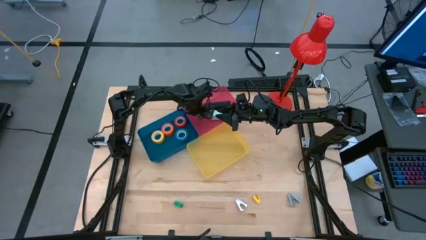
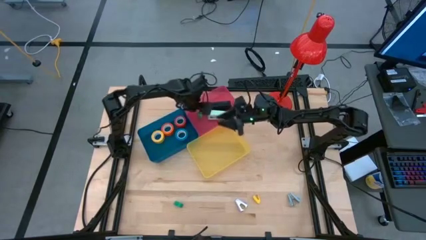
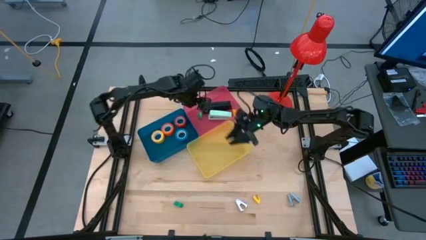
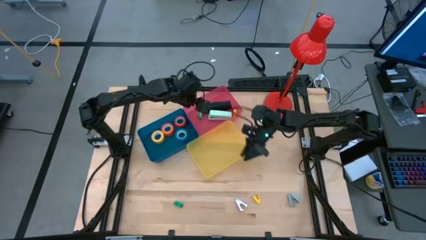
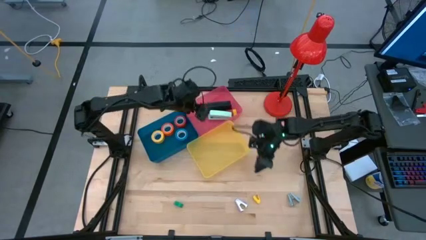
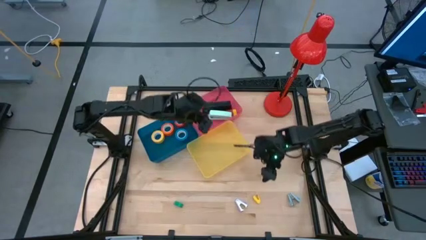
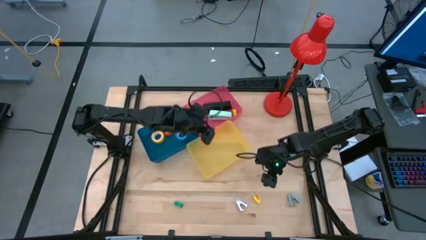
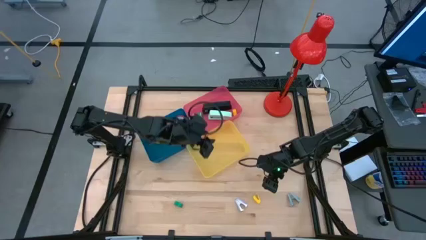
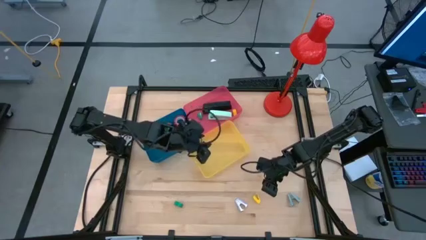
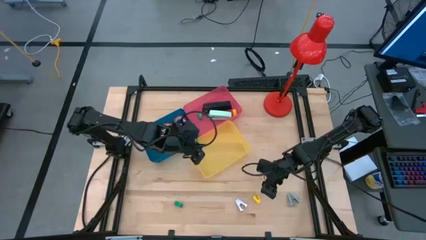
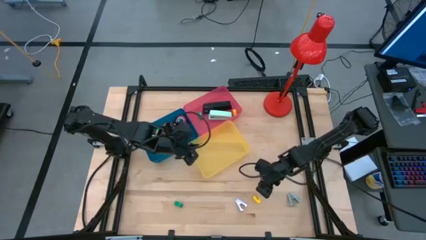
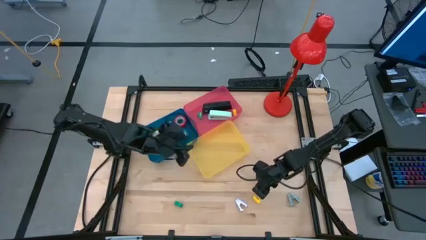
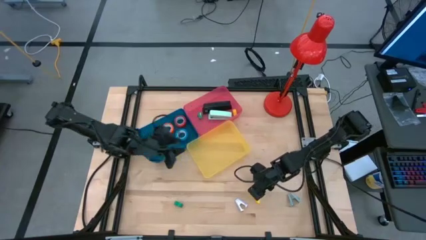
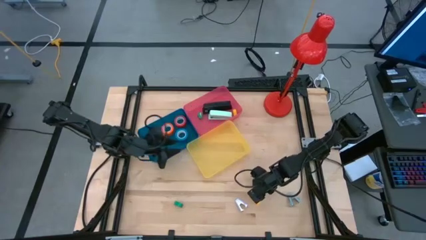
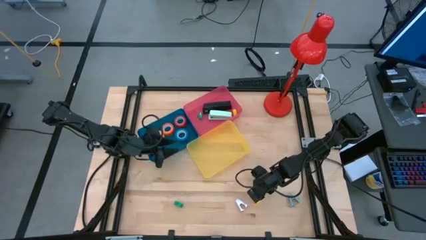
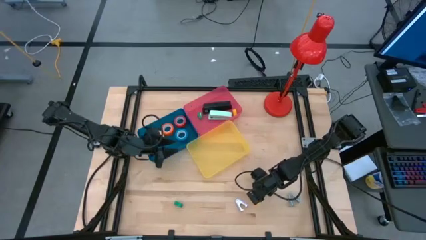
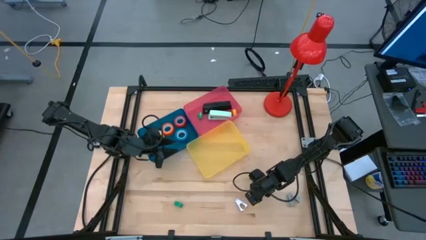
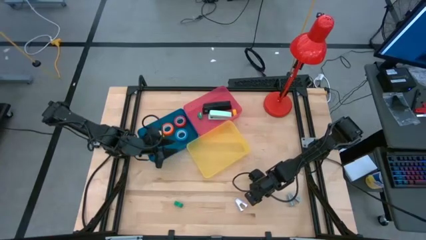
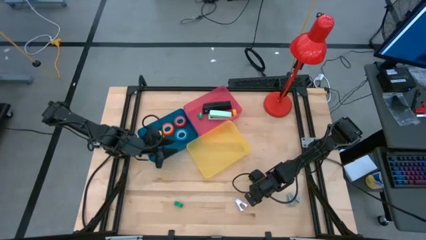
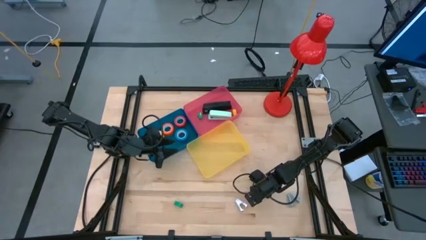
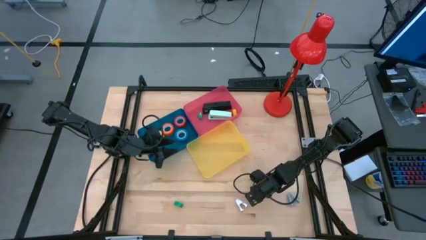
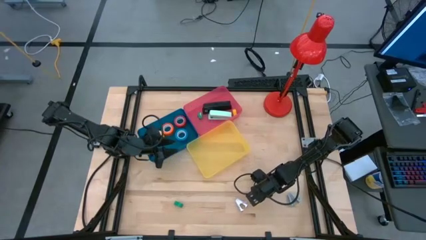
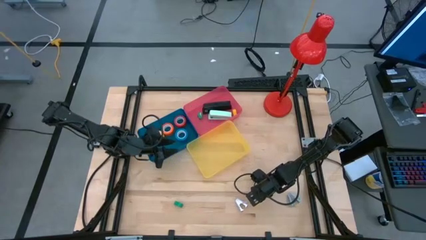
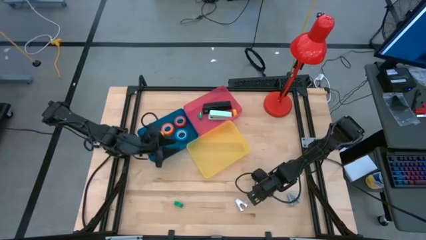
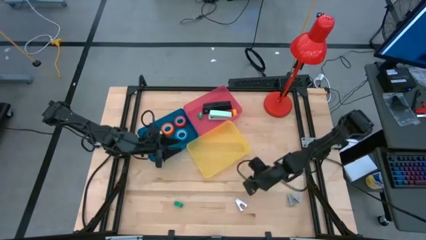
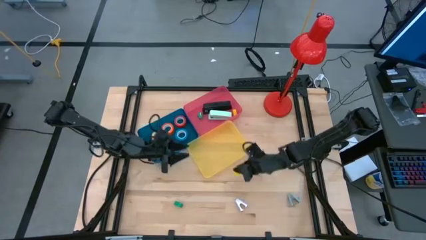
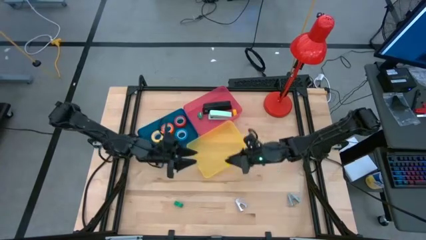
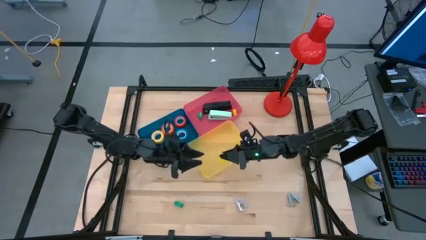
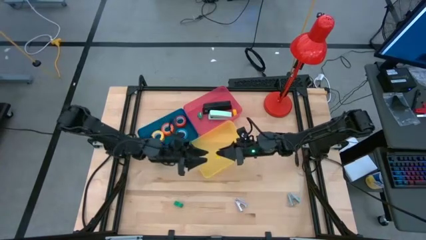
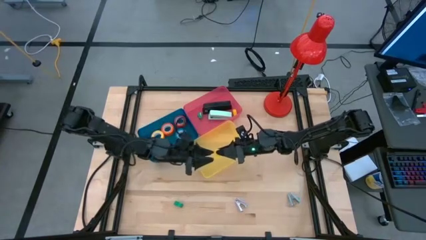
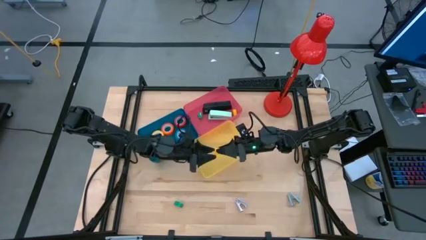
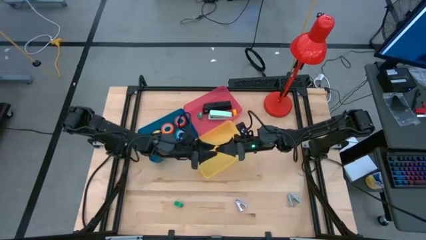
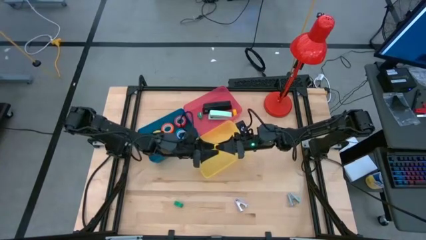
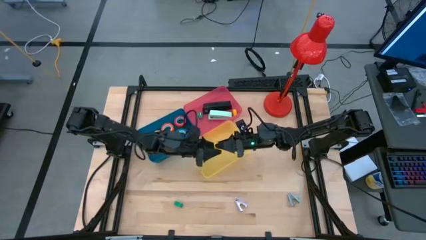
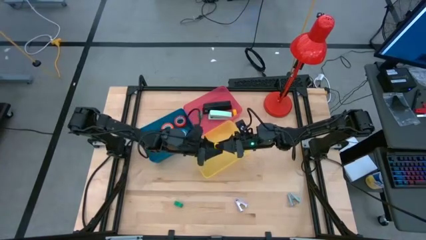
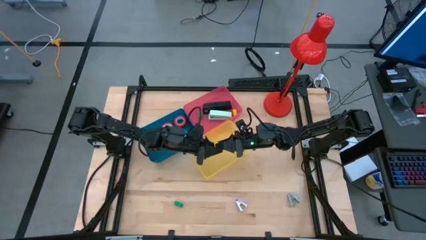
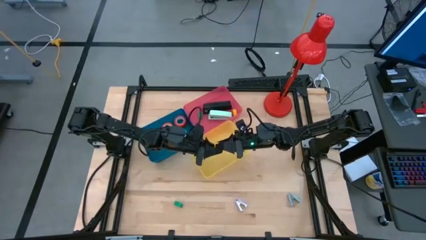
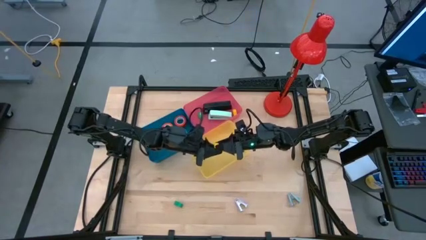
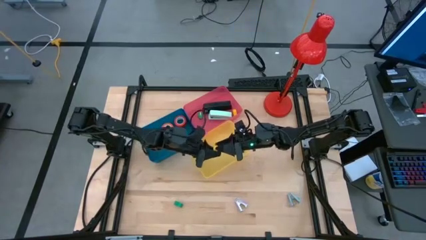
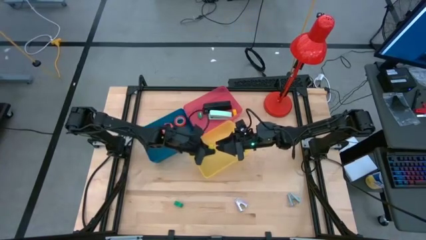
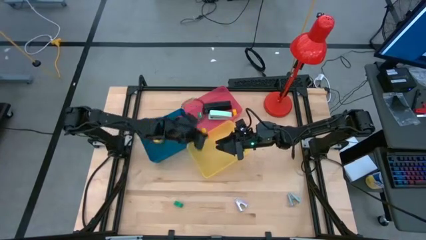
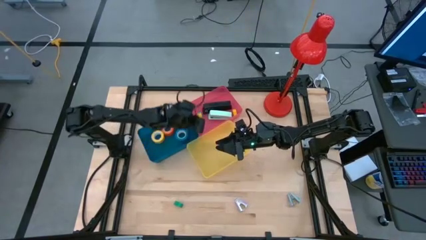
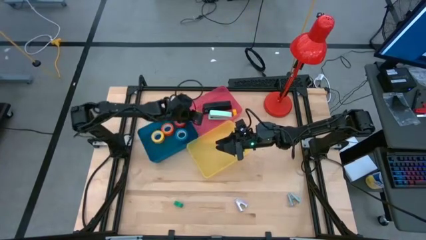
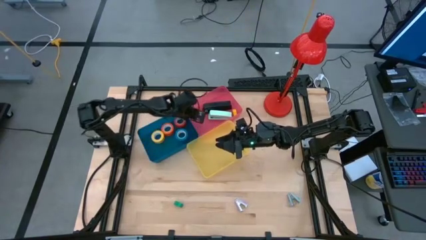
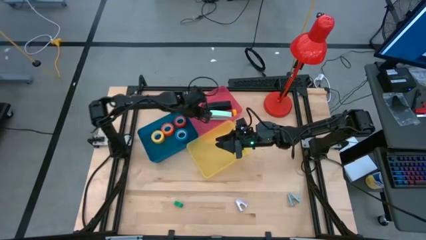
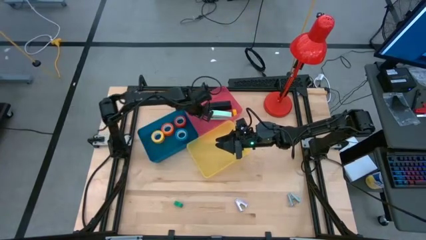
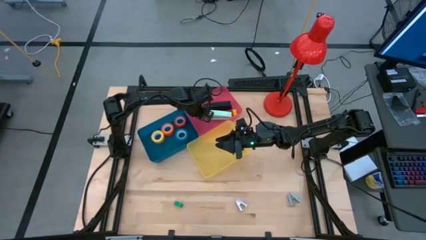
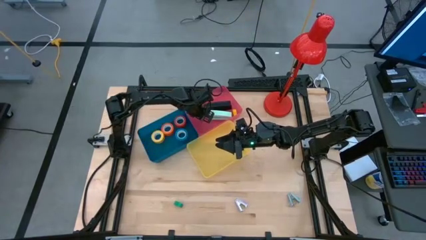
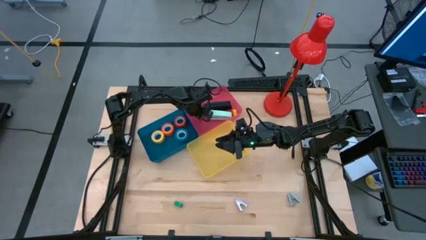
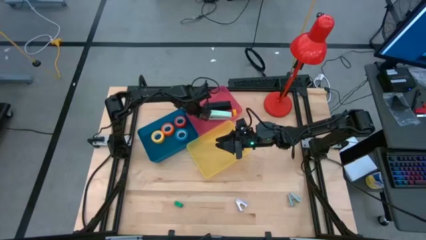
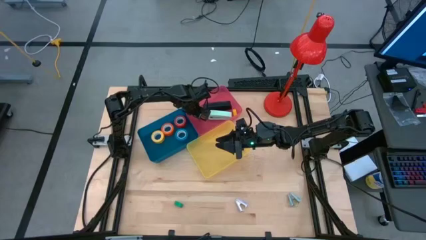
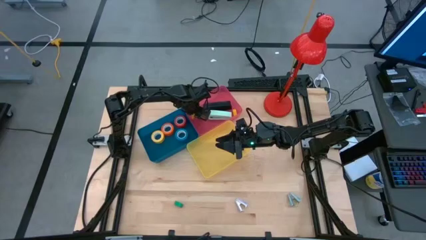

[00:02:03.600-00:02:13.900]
Task: Pick and place Stapler, Stapler remover, tape
Put the yellow stapler into the pink bin

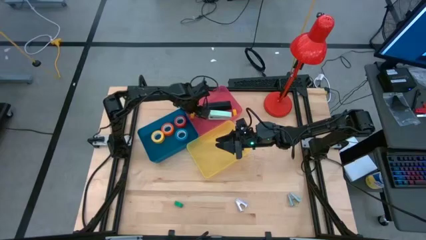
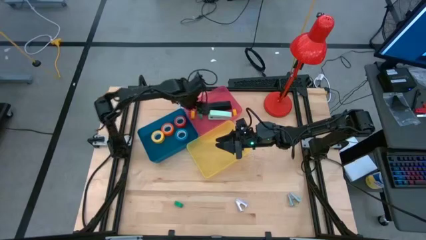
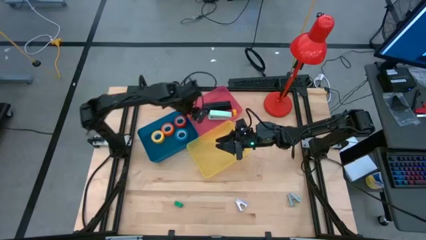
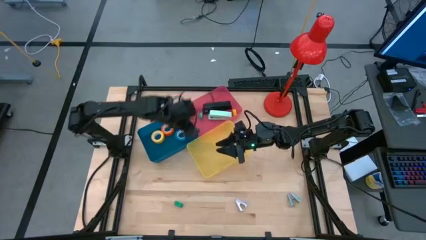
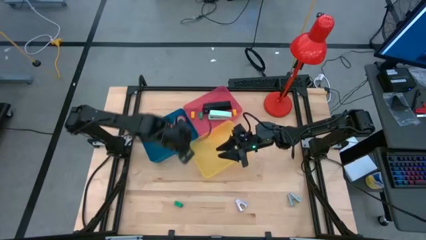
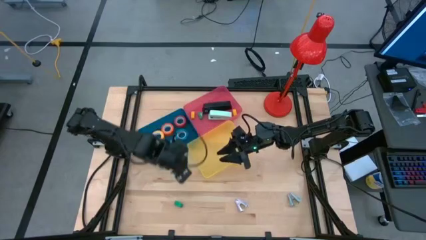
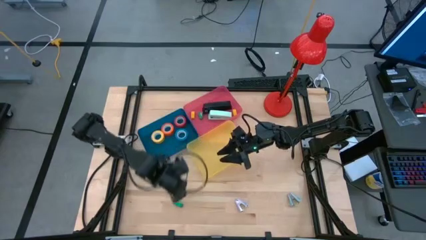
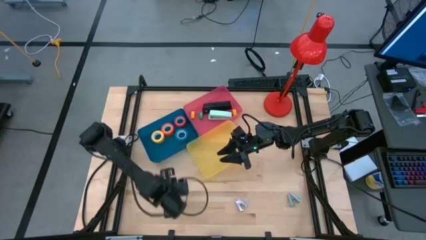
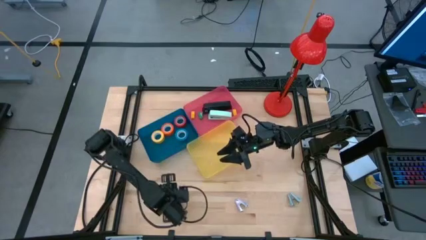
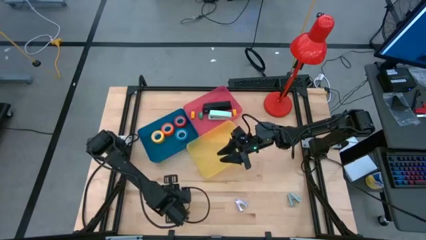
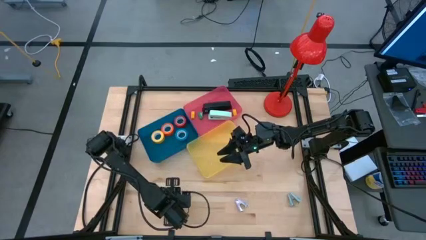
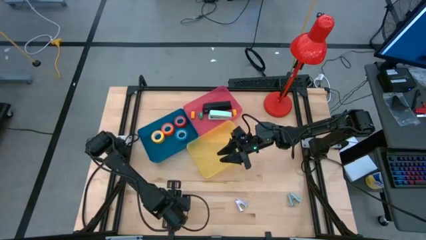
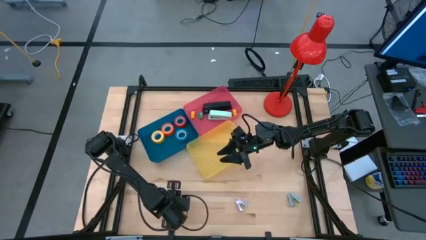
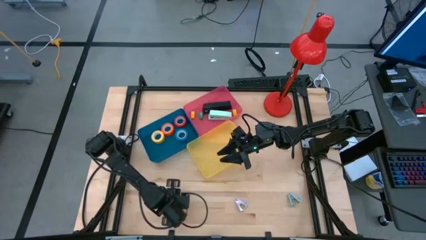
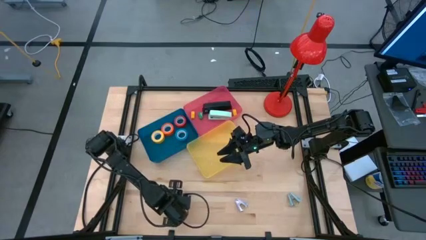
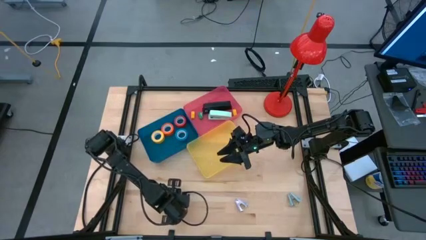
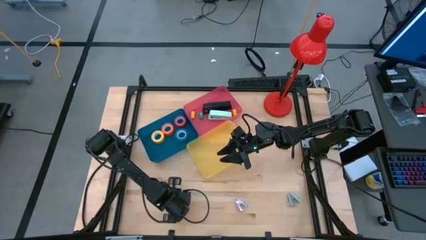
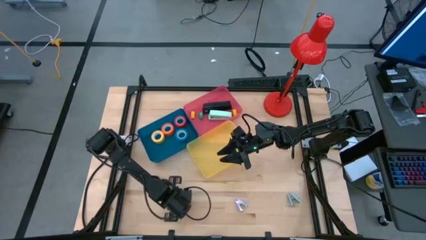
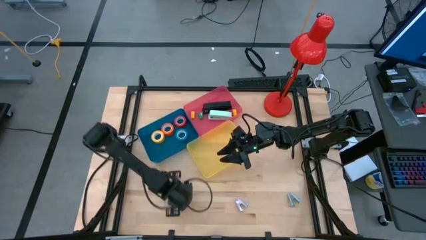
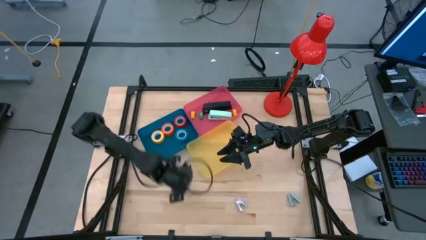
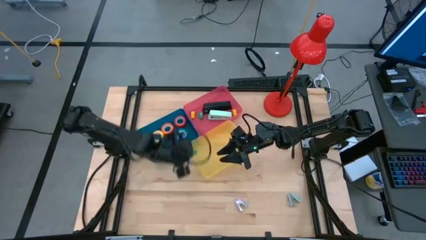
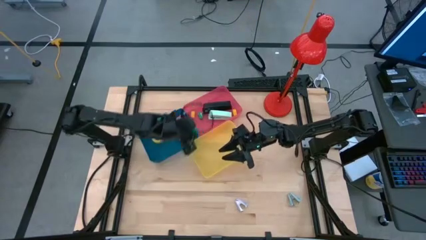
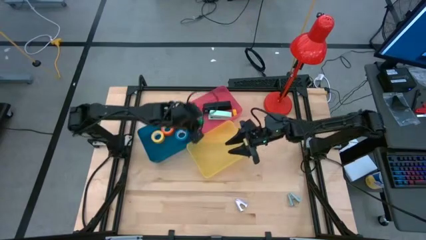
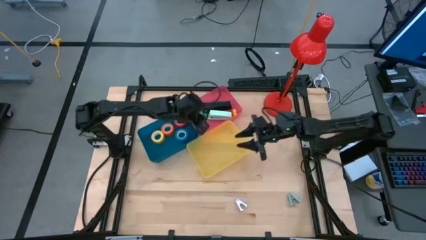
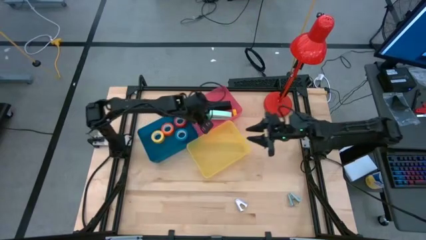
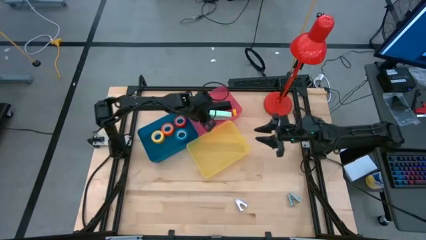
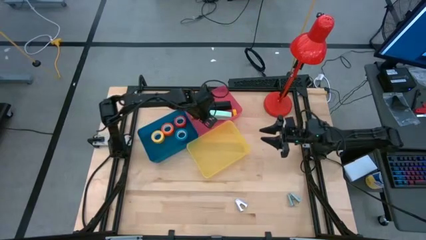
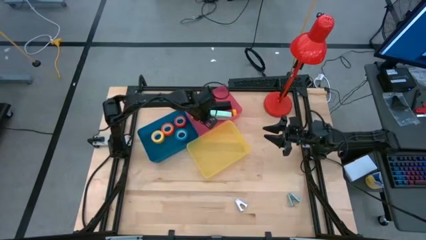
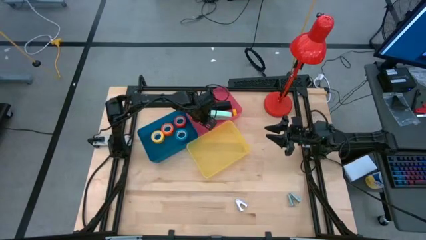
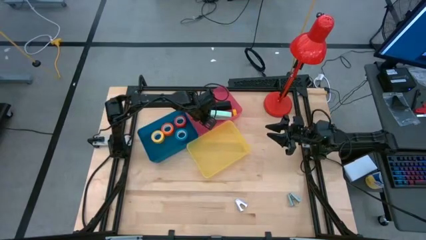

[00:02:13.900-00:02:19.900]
Put the green stapler into the pink bin
